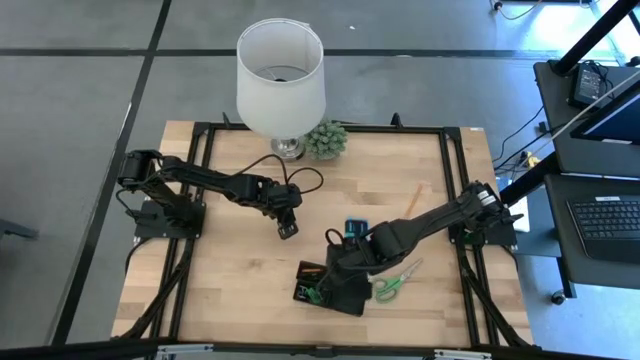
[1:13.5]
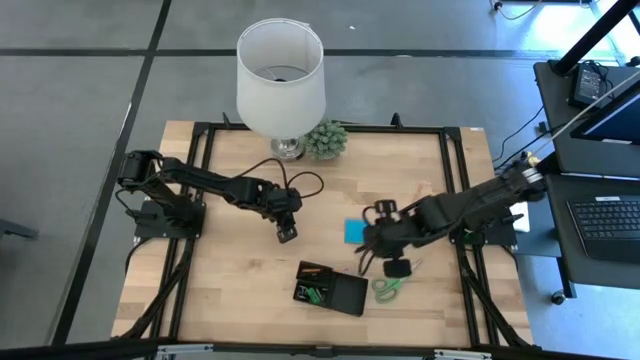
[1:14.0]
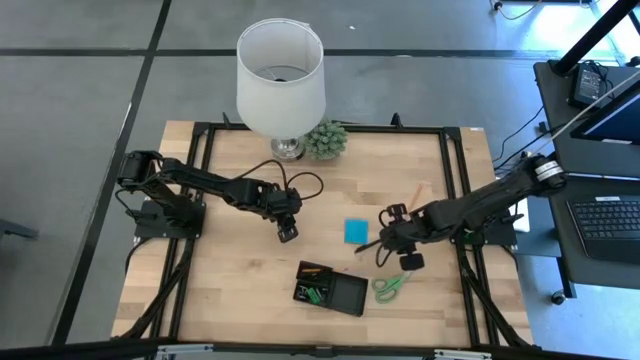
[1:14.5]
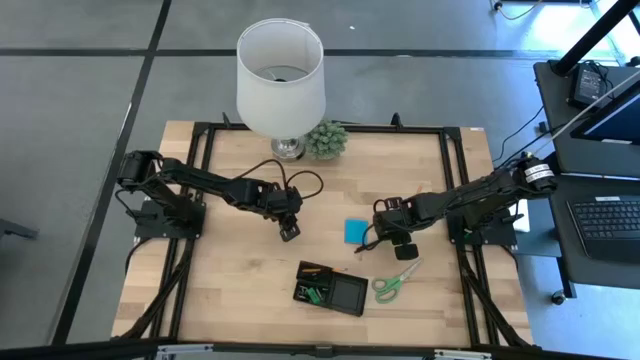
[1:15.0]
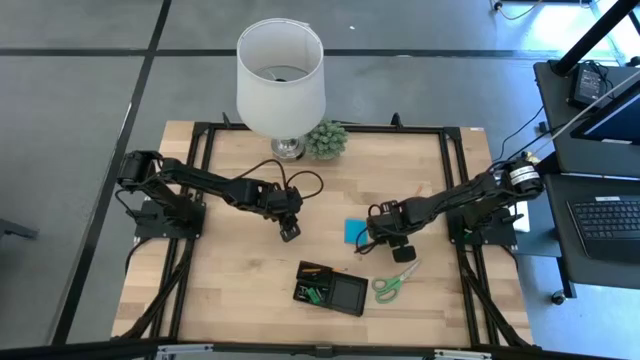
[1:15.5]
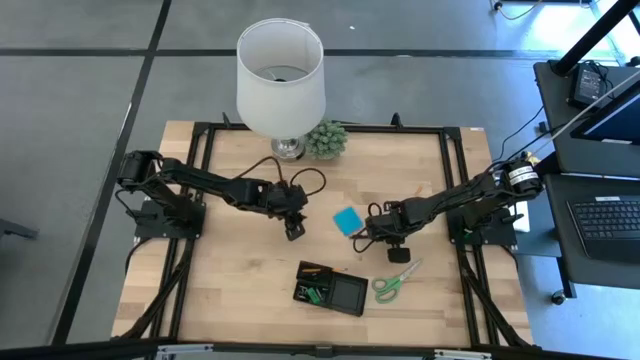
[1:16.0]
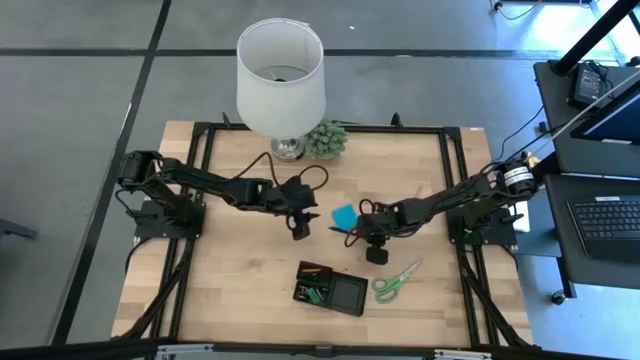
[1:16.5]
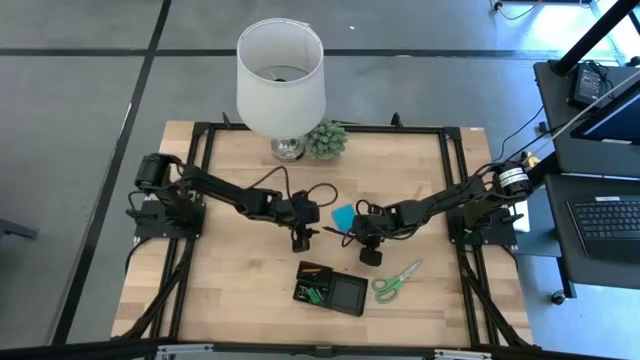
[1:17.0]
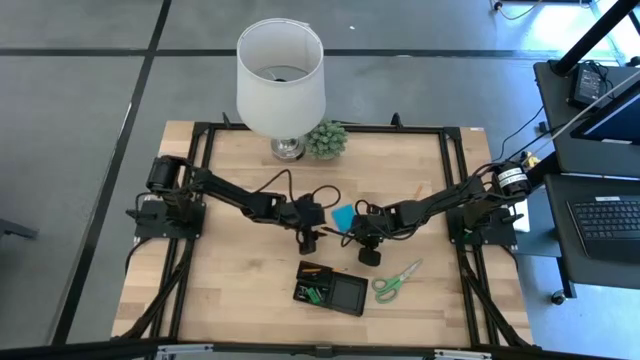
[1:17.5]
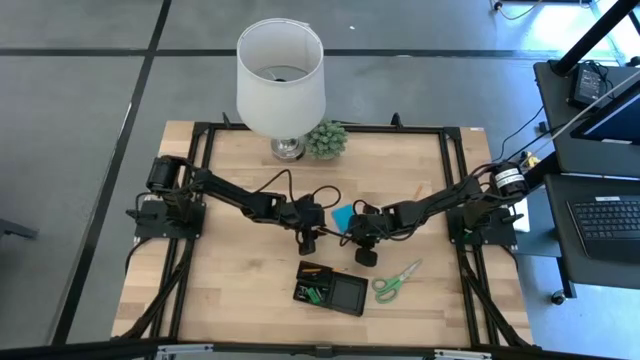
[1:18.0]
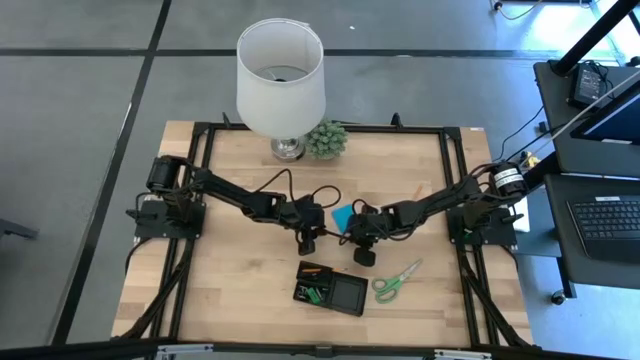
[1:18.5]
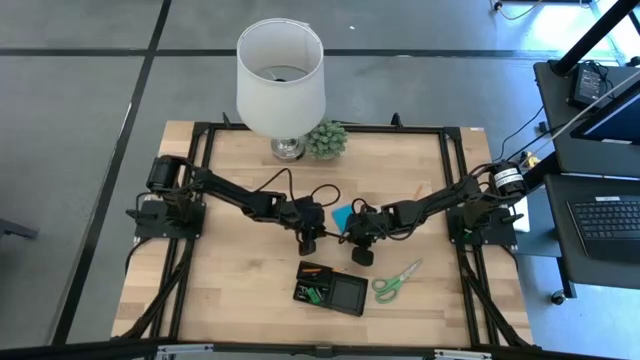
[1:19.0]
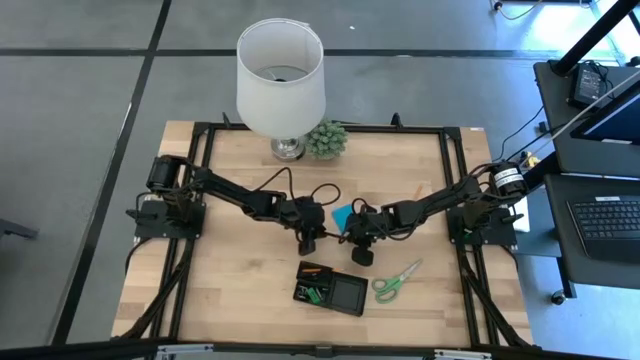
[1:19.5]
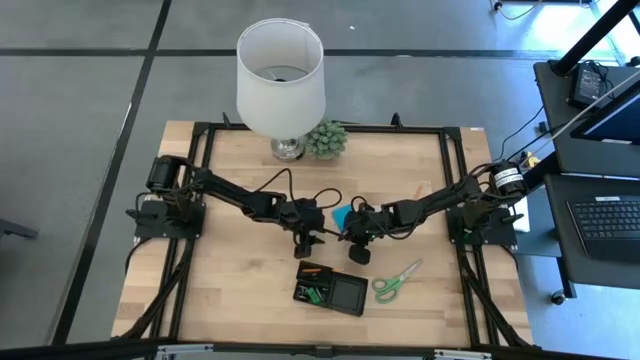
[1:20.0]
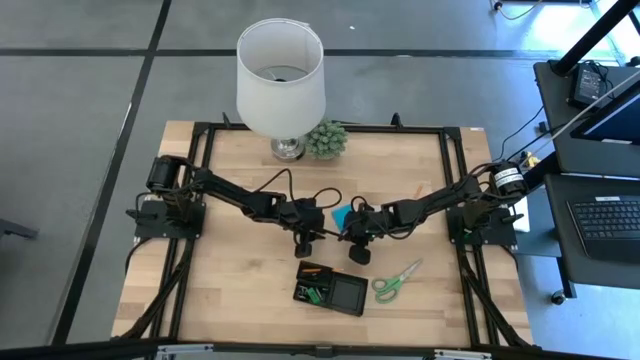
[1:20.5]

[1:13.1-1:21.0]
Task: Pick and place office supplies into organizer
Put the black pen into the desk organizer

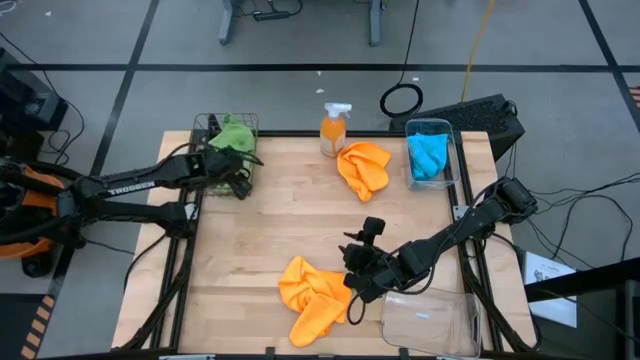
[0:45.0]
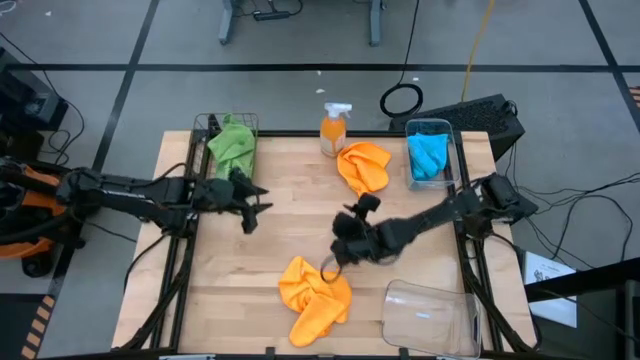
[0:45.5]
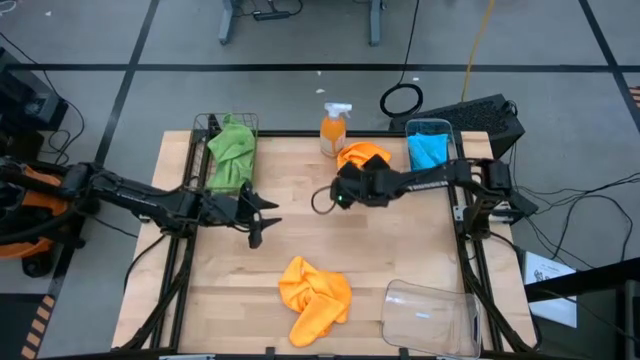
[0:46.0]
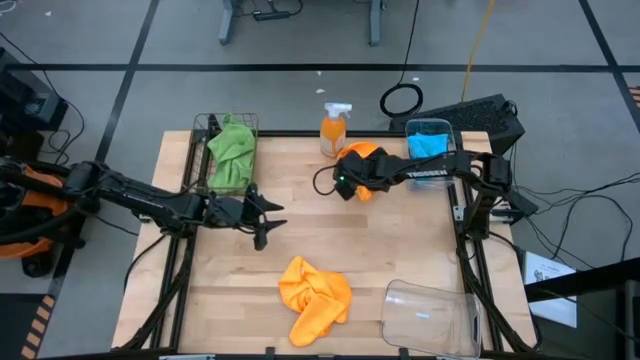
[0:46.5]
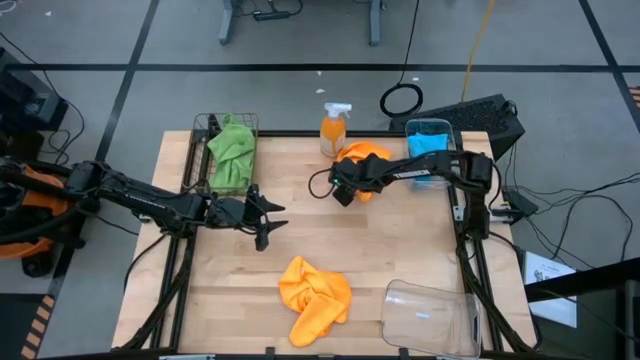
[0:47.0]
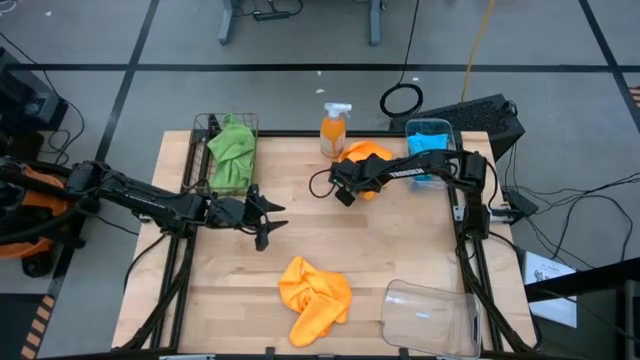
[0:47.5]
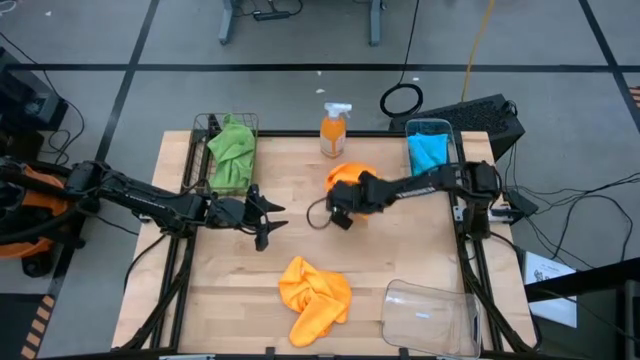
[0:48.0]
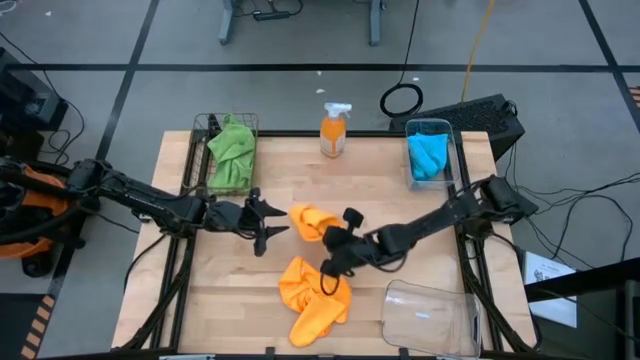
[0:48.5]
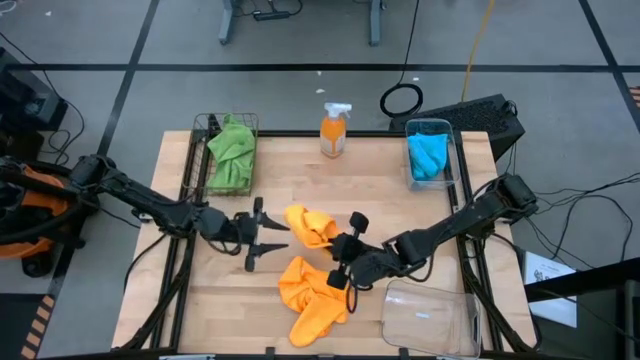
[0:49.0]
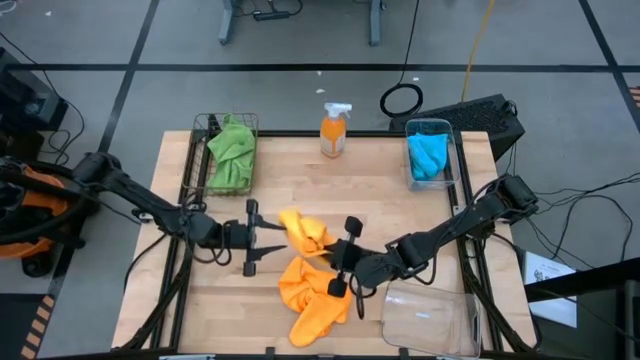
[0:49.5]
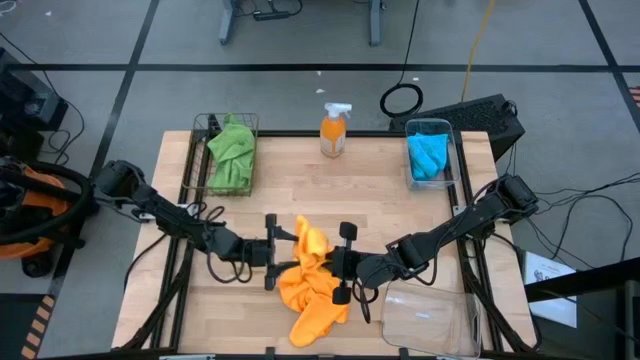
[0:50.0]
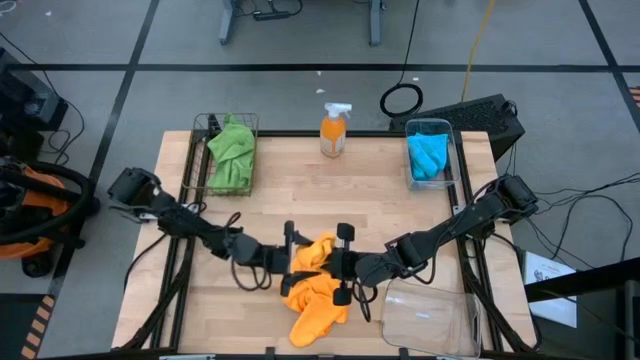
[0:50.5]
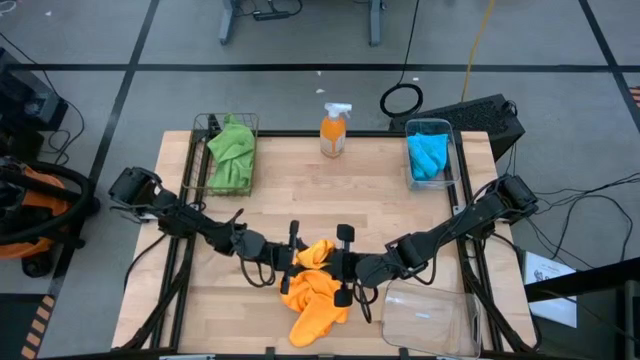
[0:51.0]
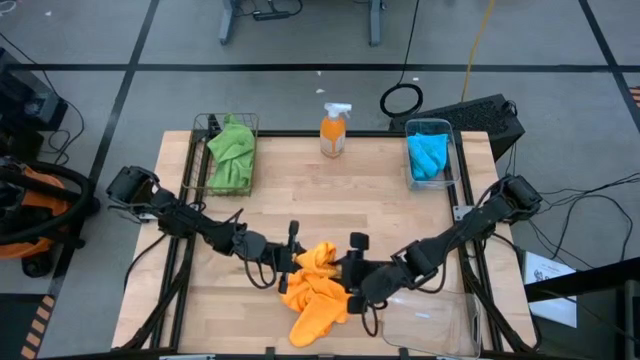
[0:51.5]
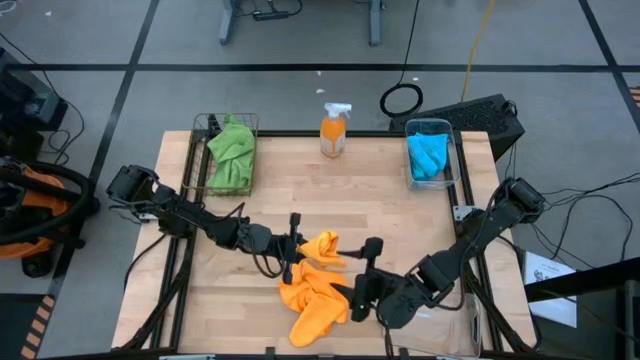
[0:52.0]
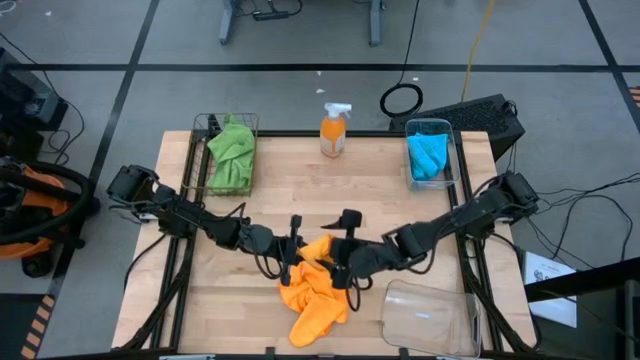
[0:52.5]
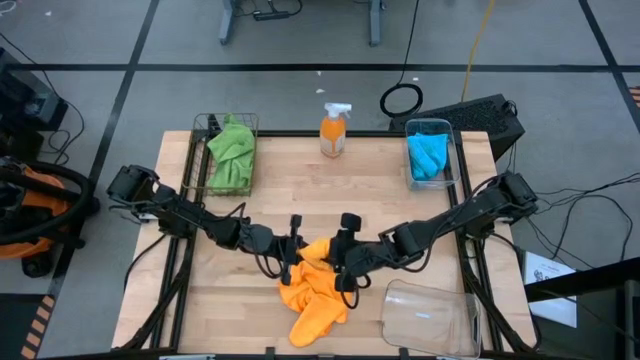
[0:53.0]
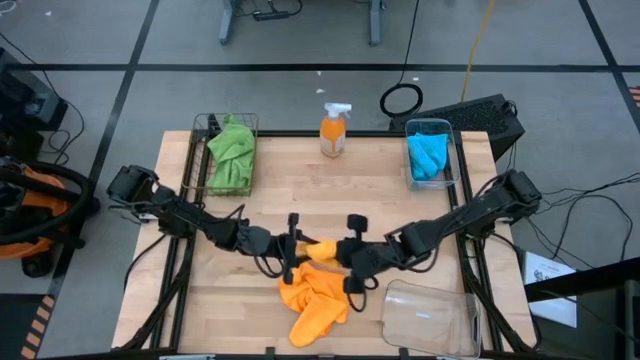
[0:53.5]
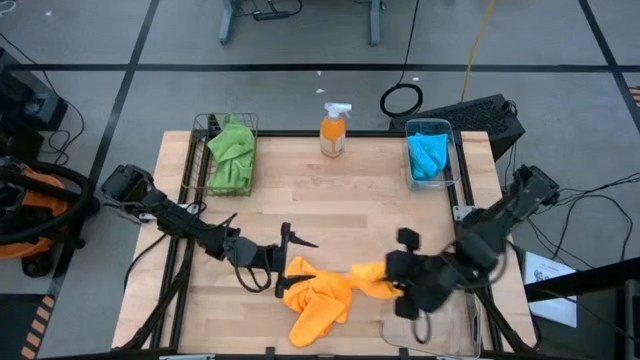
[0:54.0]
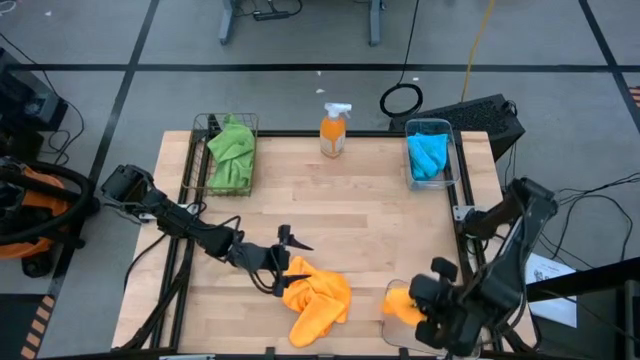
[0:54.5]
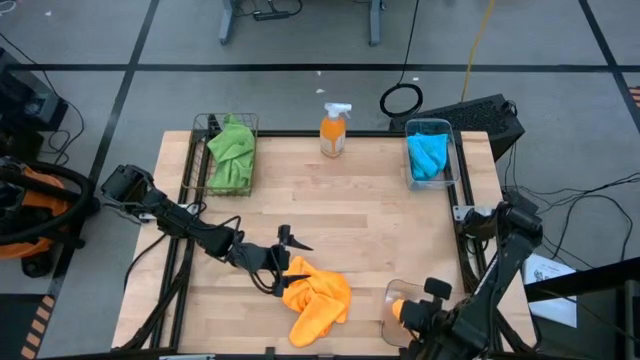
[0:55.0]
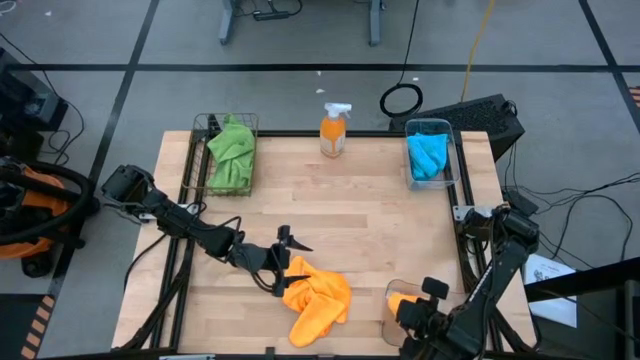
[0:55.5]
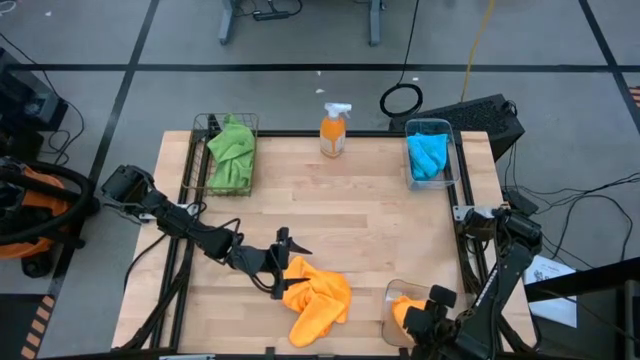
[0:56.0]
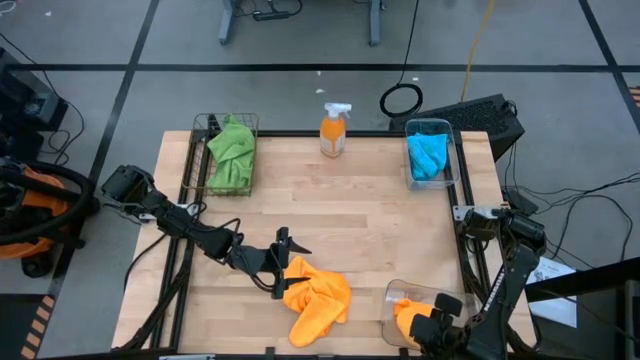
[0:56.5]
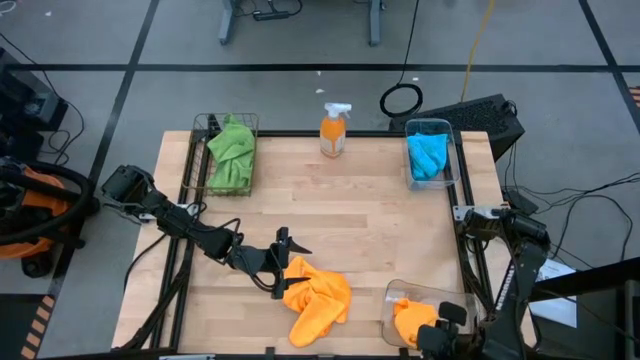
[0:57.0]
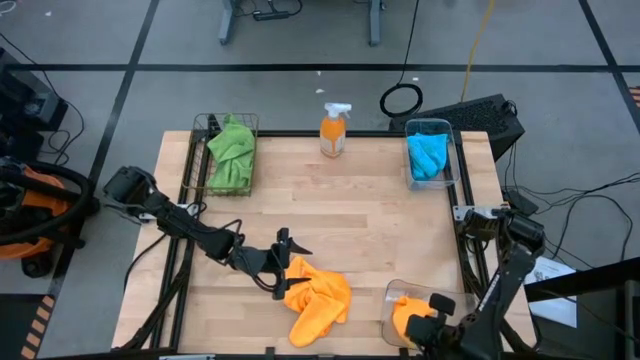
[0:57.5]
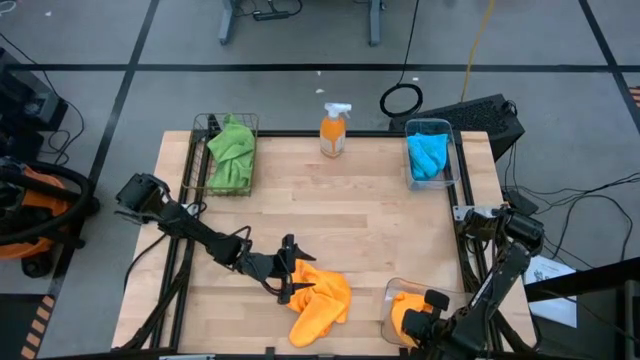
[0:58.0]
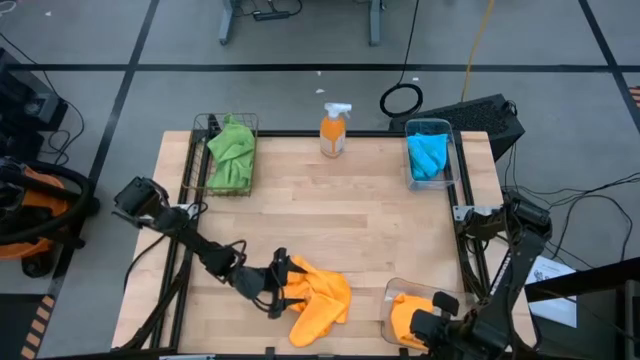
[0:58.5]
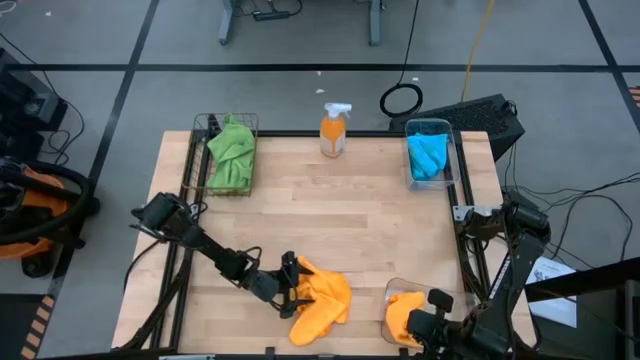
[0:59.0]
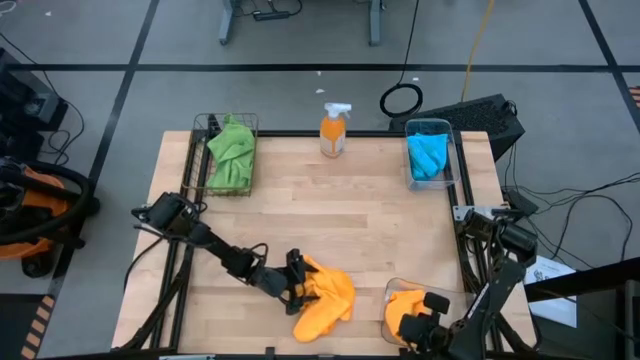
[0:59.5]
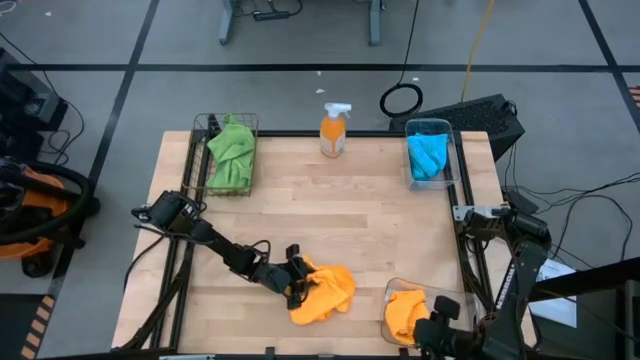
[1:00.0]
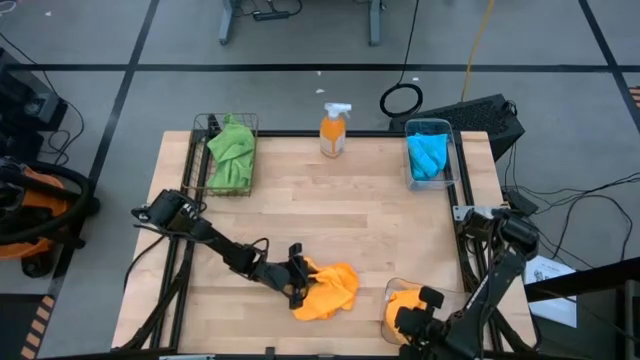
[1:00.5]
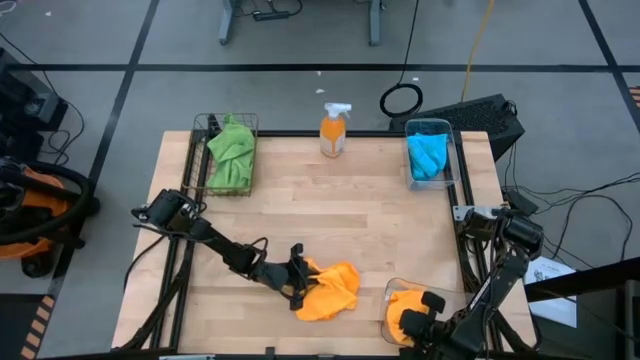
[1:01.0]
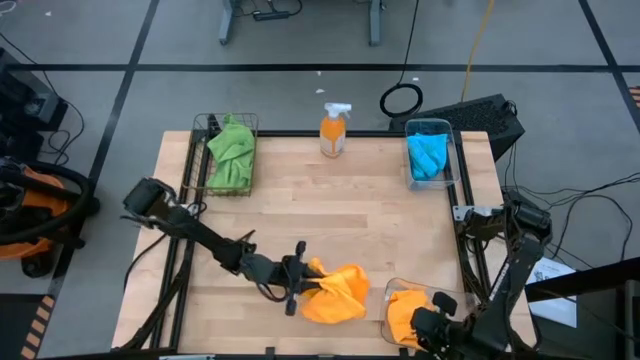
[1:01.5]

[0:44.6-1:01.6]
Task: Sort microfiber towel by color & place in baskets
Put the top yellow microfiber towel into the bottom transparent bin
